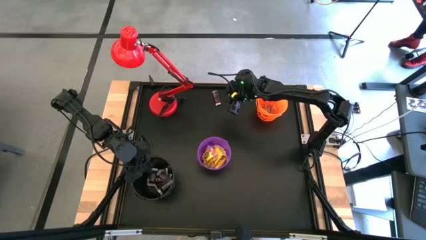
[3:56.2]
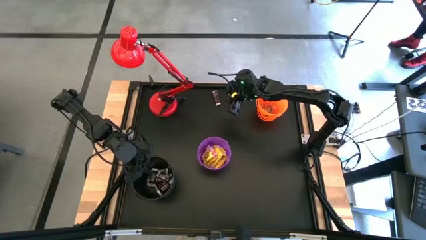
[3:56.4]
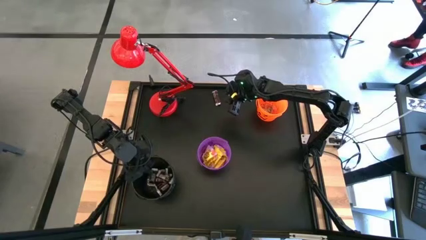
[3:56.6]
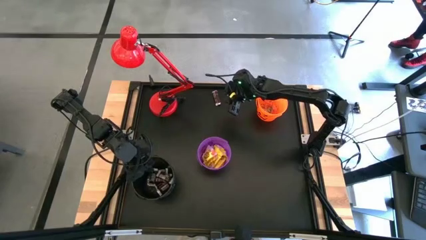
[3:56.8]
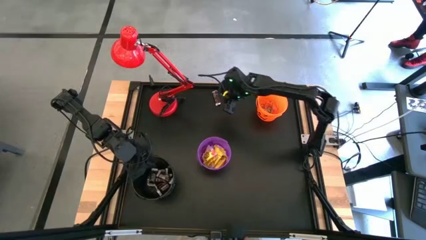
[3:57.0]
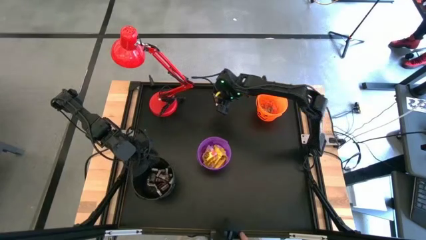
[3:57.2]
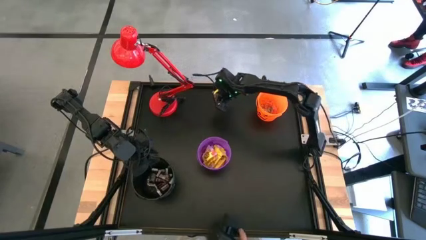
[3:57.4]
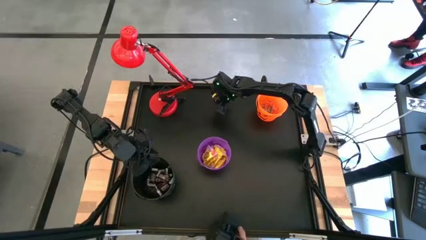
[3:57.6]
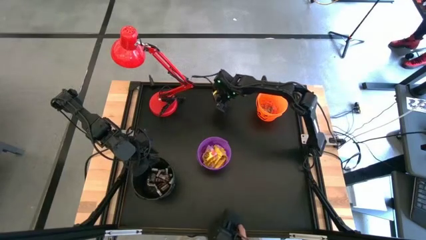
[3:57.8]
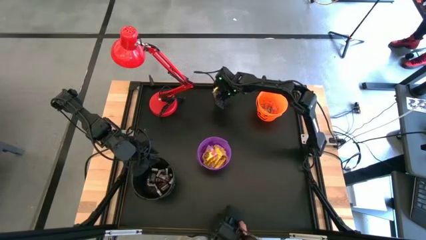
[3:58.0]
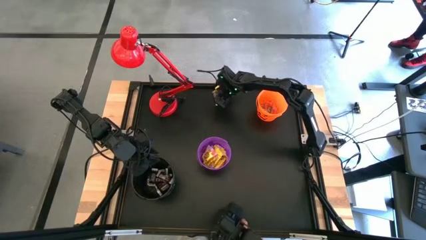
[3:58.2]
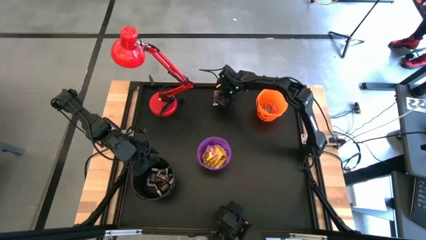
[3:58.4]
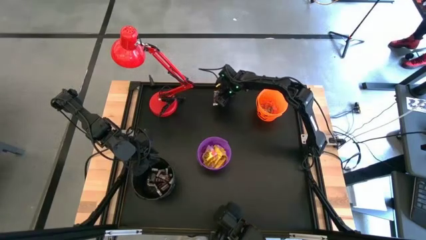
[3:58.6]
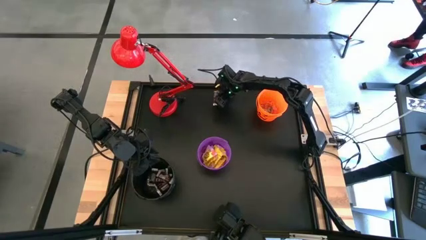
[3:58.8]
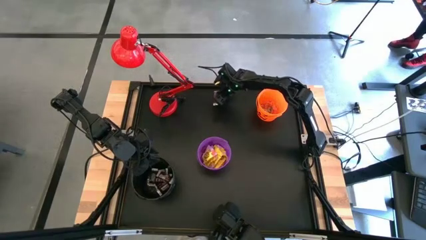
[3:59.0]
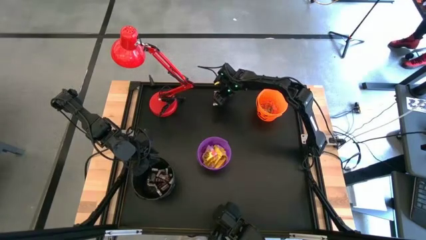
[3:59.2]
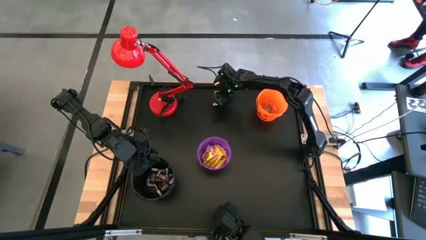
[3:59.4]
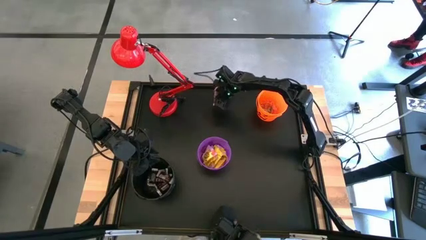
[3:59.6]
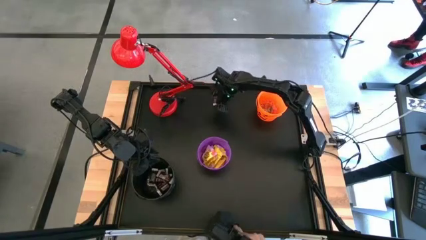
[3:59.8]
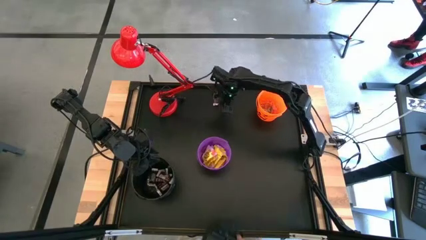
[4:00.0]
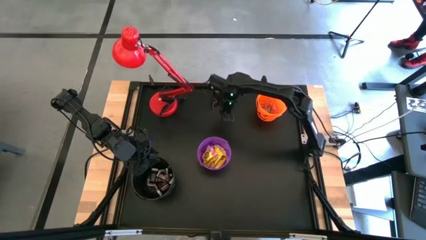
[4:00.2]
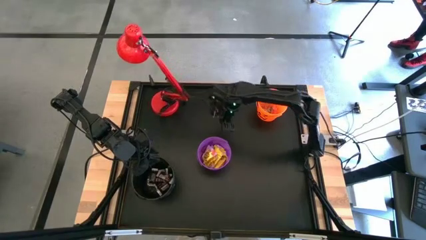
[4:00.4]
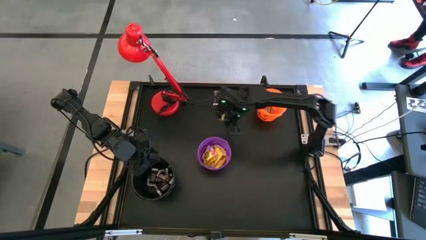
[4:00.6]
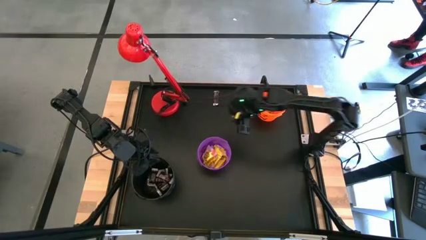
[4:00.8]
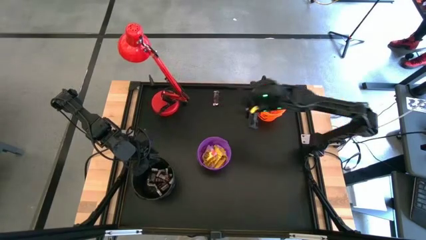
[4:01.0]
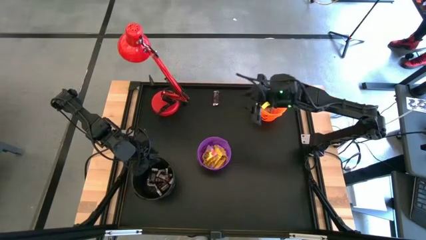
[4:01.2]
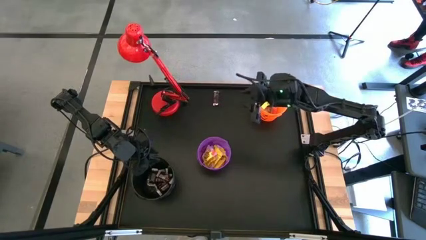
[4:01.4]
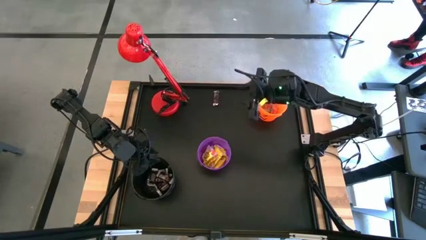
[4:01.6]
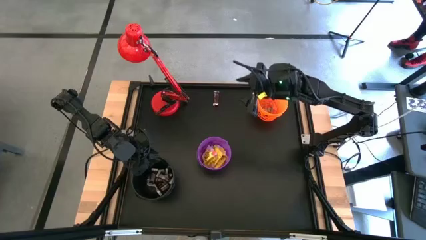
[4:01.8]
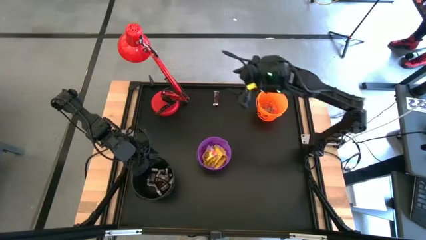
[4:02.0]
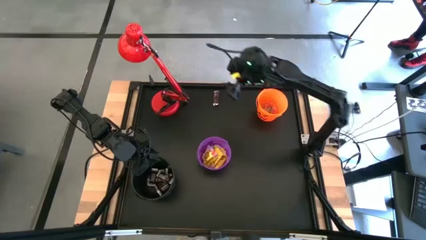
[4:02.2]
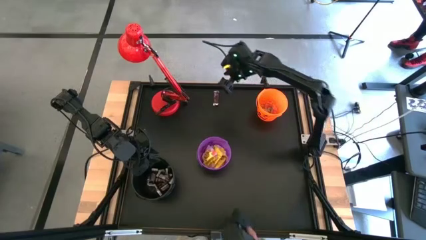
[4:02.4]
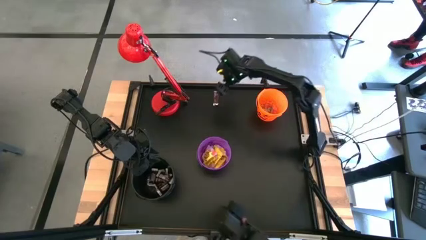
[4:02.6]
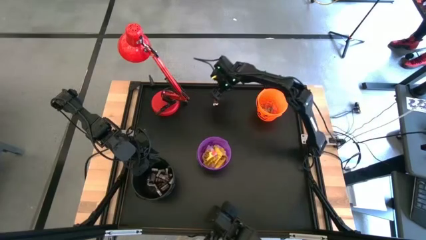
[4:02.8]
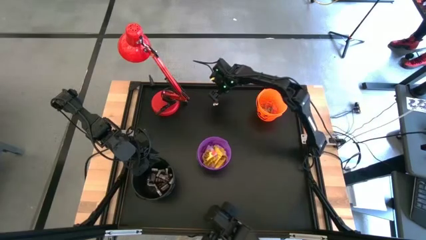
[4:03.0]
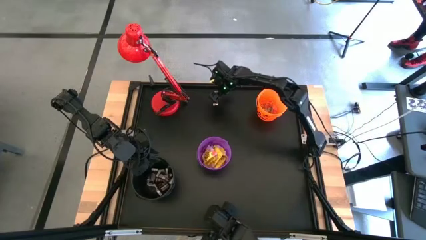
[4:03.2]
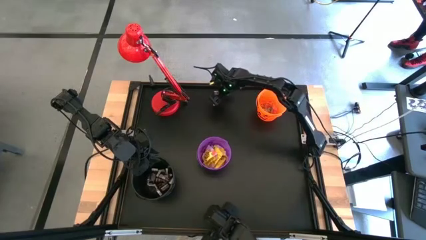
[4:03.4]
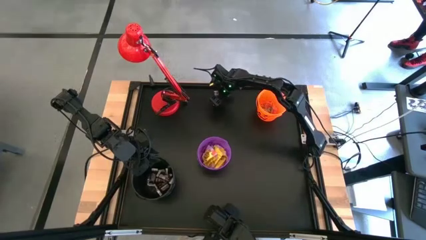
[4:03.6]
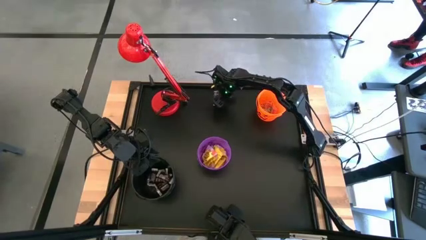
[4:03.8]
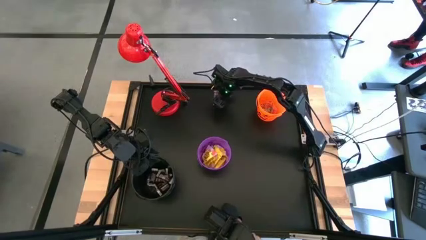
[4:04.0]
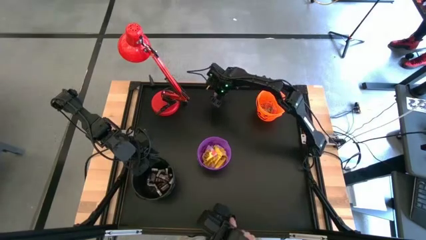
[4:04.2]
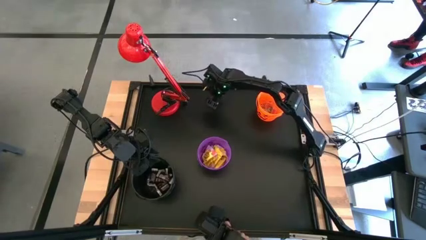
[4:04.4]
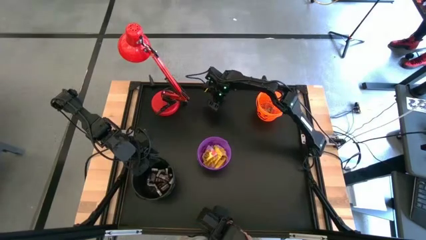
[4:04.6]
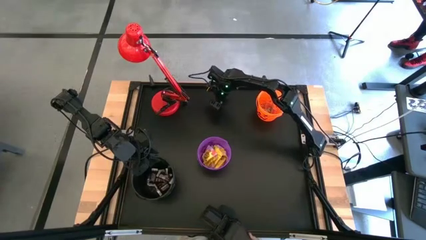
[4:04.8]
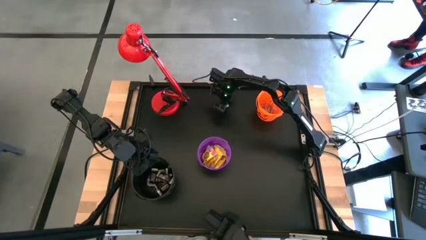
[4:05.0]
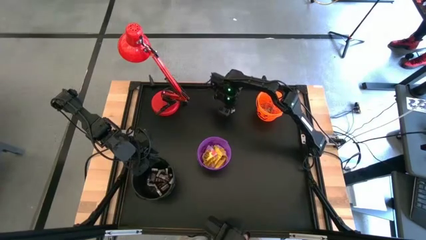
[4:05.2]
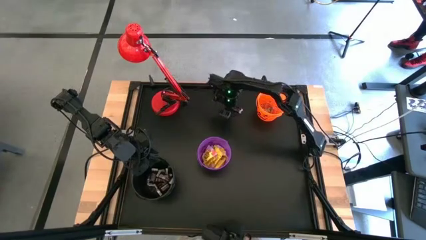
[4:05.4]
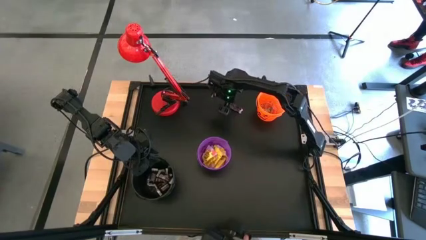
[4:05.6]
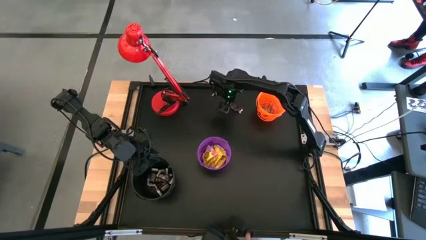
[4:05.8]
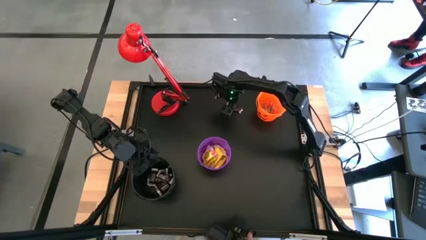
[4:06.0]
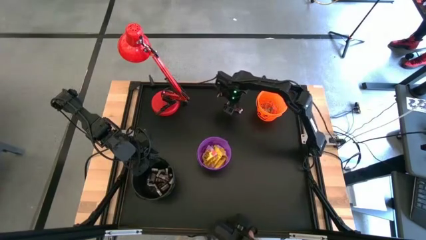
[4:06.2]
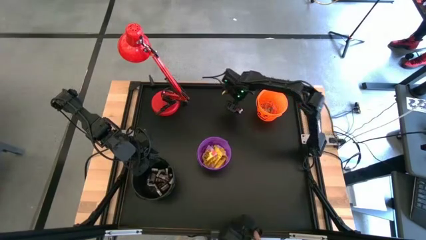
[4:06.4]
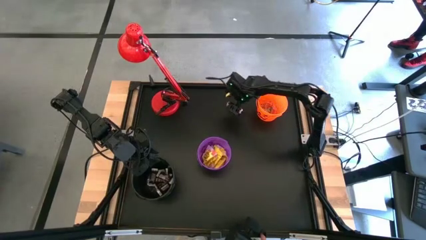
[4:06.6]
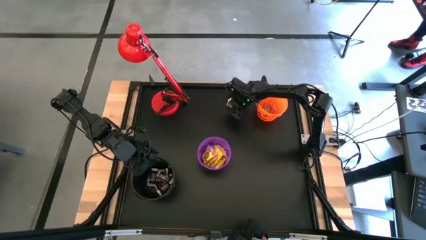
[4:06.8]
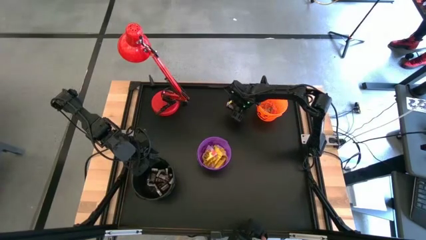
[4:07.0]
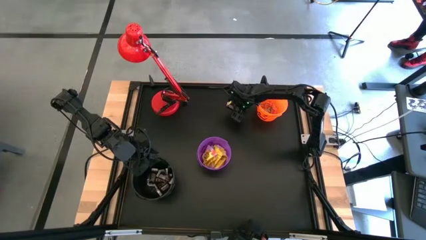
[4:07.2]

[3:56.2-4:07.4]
Task: Sort candy
Put the brown chocolate bar into the black bucket

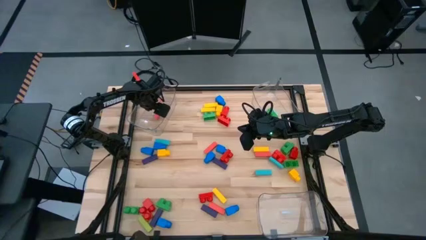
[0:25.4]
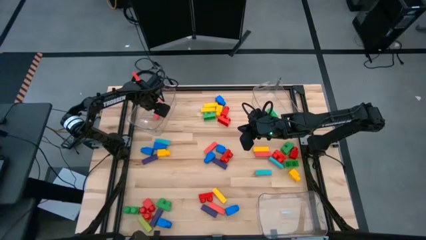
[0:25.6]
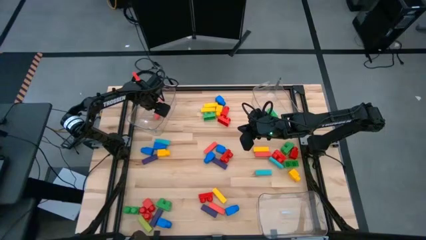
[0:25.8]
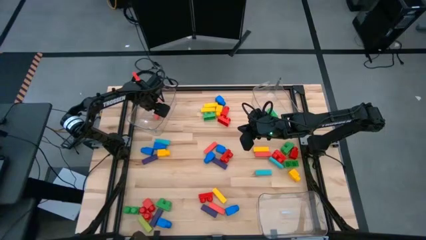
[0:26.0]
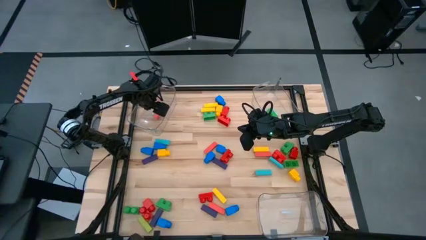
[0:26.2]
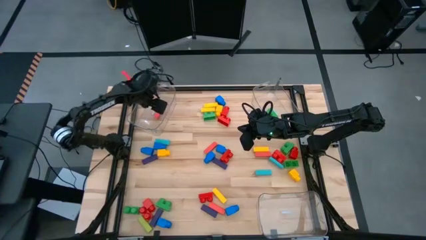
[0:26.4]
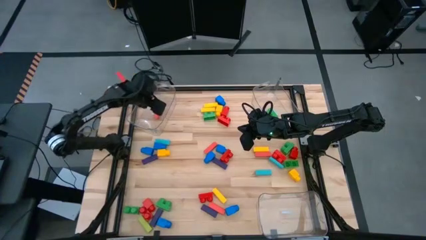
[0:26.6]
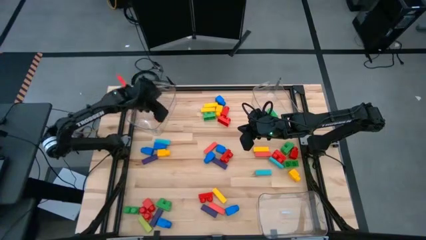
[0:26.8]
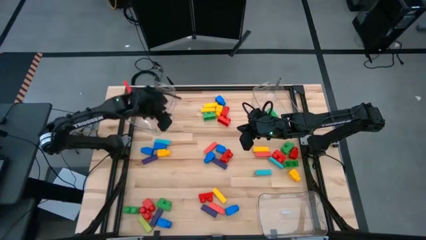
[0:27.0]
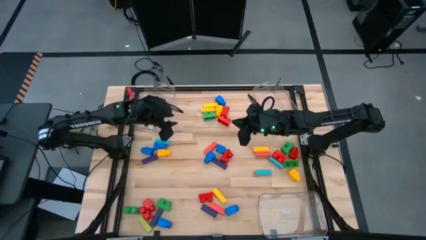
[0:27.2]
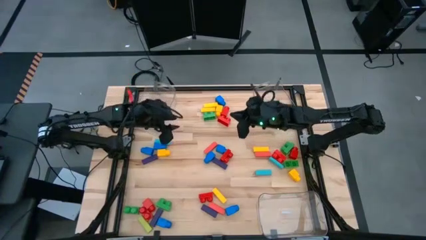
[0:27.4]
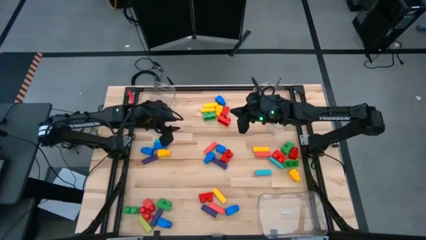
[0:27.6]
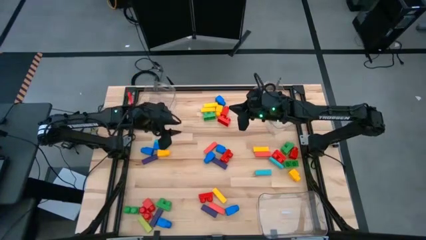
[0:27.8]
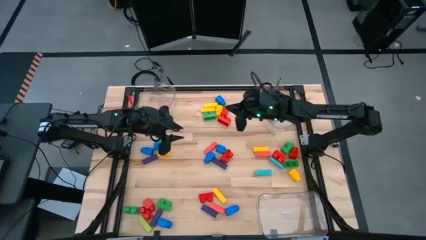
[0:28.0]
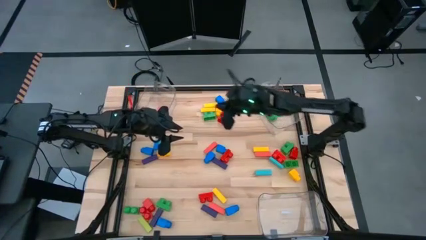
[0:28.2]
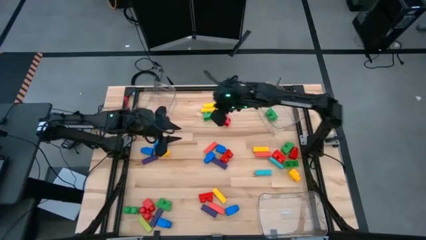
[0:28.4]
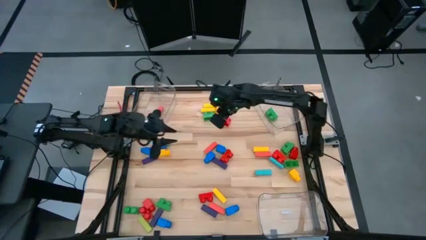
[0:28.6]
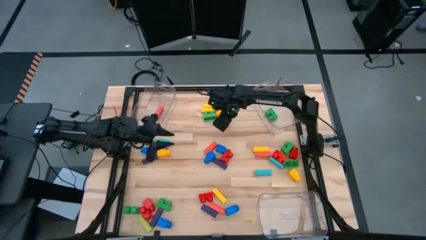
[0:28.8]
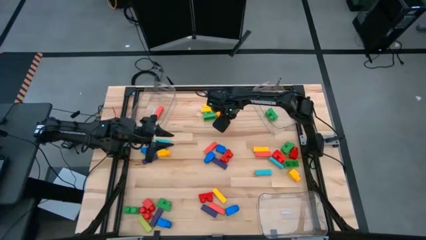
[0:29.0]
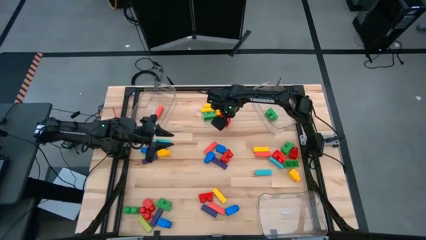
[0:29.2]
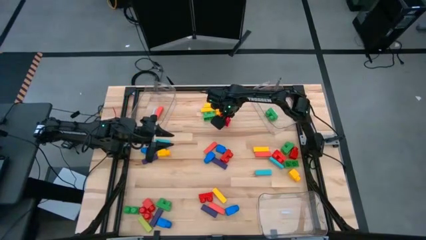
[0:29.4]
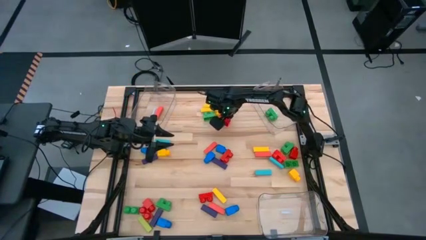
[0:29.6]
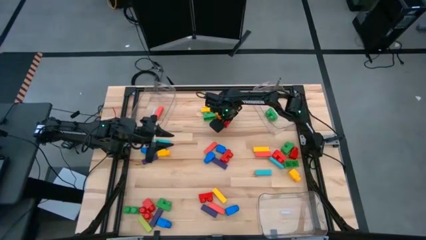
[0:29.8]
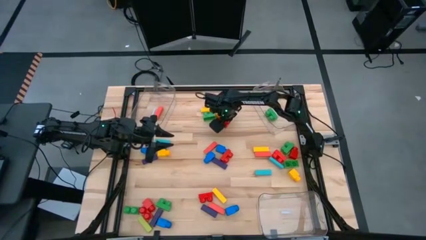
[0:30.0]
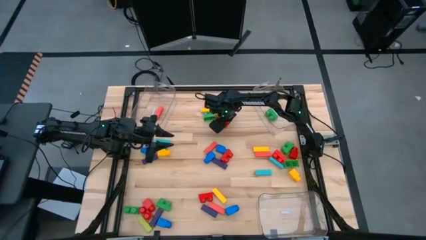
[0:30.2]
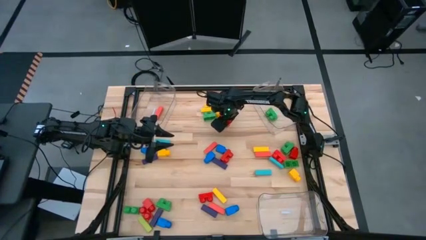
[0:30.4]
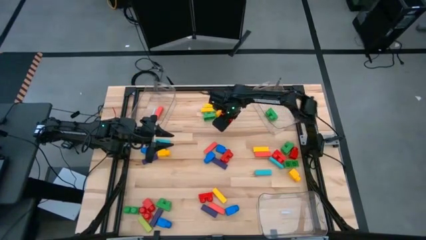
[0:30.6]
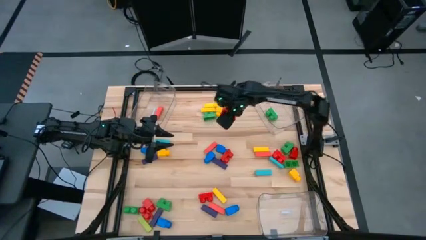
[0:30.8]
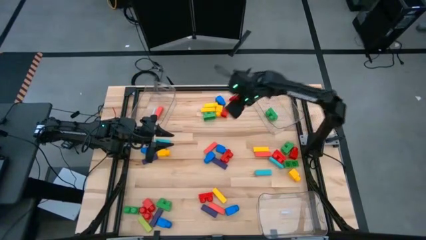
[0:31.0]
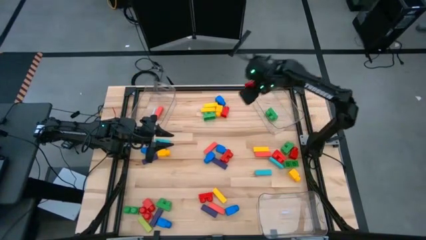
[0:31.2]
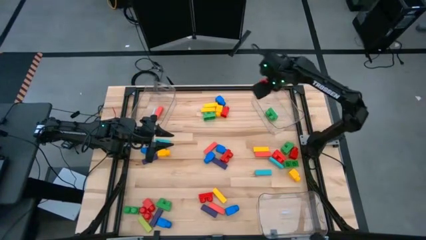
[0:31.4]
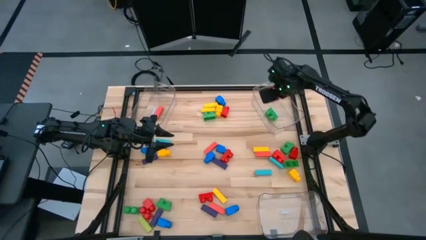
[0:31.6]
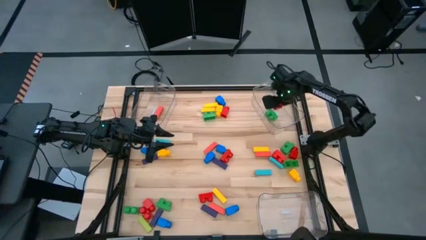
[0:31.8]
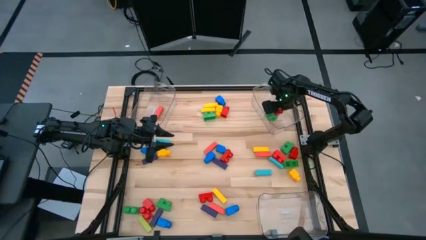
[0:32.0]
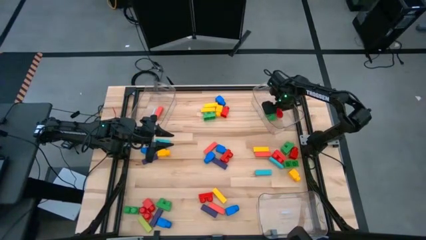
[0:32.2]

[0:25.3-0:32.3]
Task: Sort blocks by size
Put the red 2 stud game piece into the top right transparent bin
